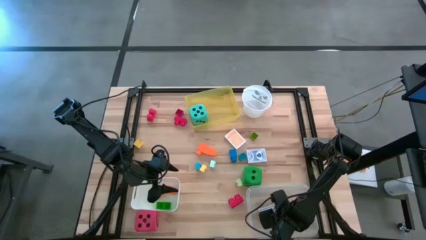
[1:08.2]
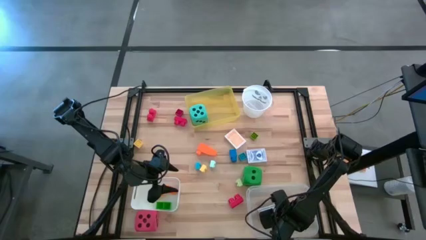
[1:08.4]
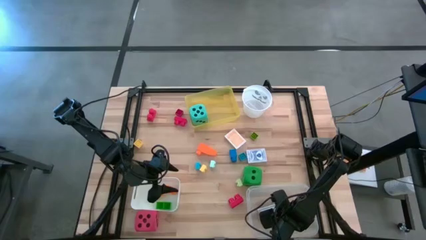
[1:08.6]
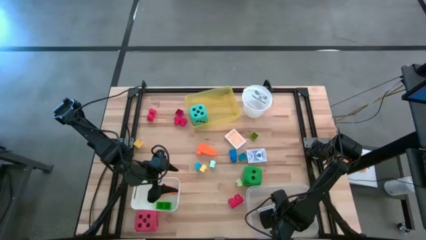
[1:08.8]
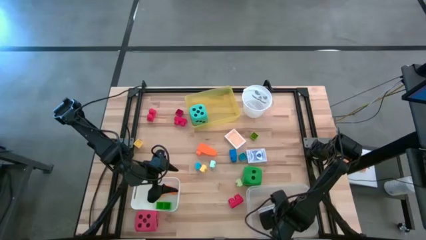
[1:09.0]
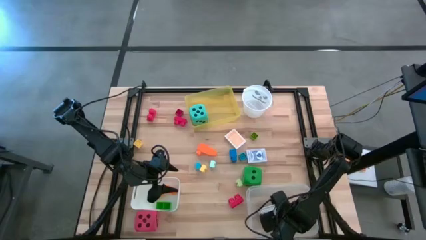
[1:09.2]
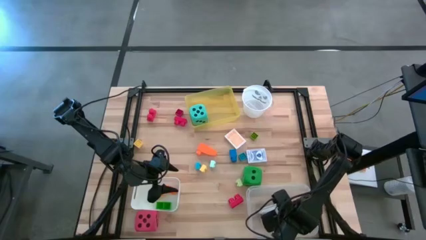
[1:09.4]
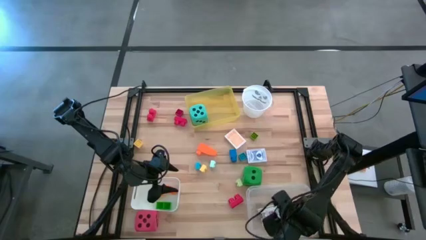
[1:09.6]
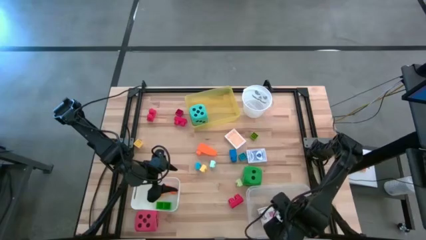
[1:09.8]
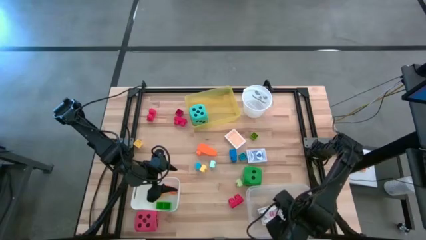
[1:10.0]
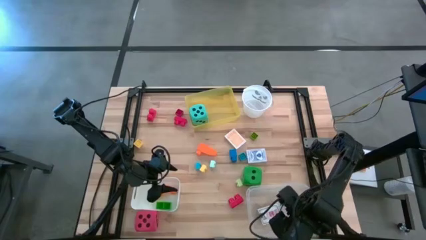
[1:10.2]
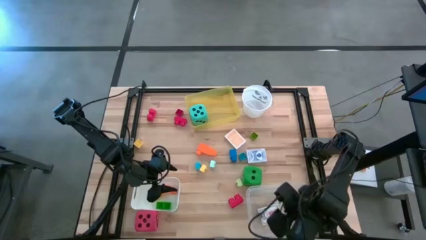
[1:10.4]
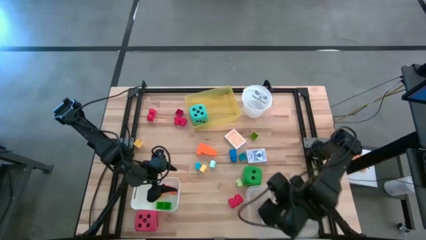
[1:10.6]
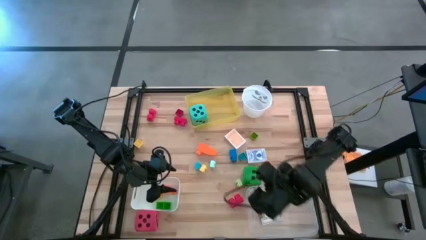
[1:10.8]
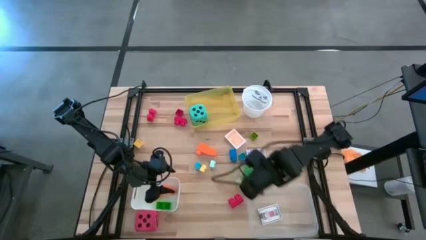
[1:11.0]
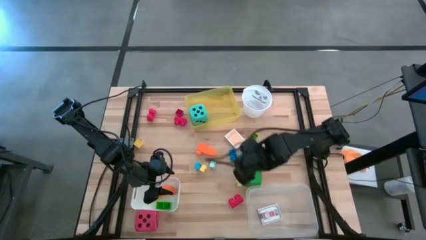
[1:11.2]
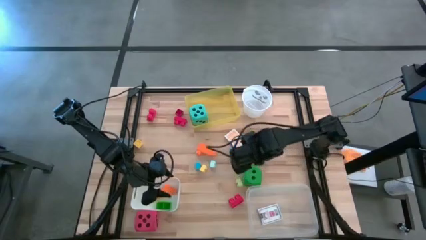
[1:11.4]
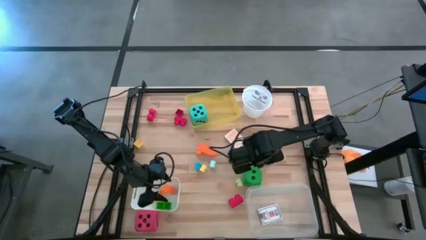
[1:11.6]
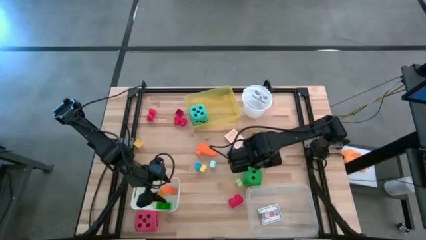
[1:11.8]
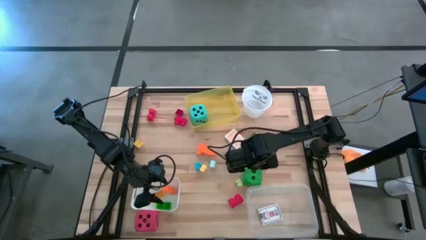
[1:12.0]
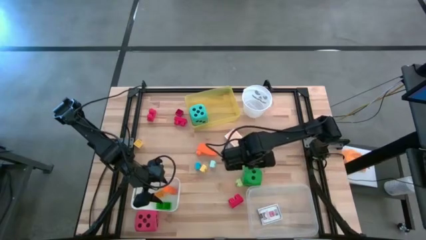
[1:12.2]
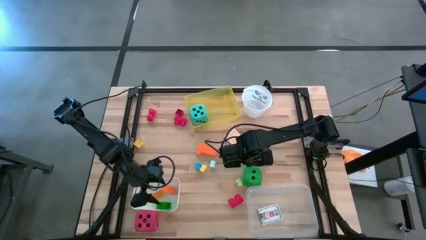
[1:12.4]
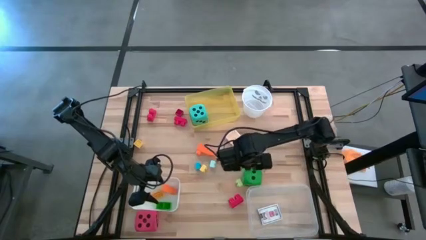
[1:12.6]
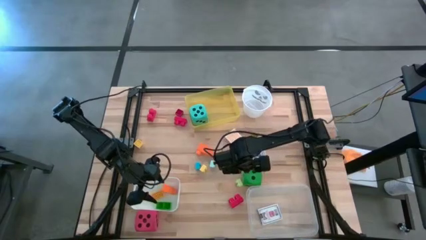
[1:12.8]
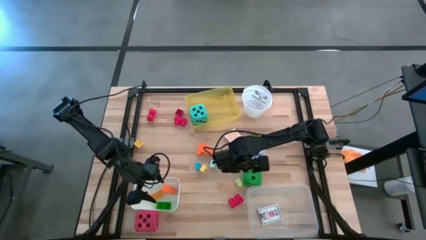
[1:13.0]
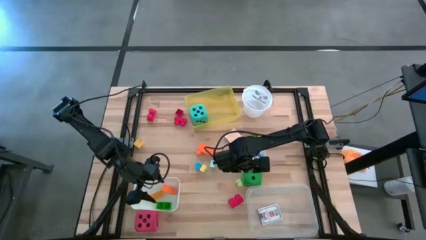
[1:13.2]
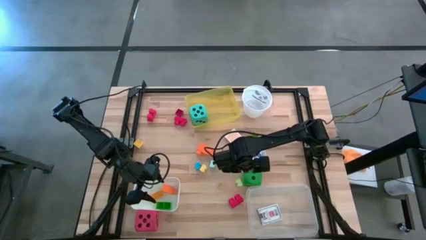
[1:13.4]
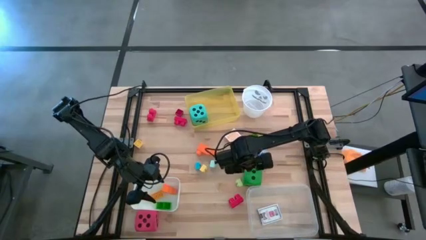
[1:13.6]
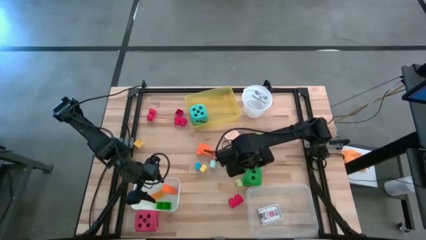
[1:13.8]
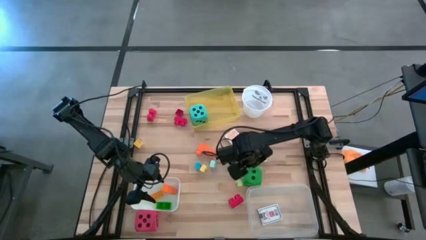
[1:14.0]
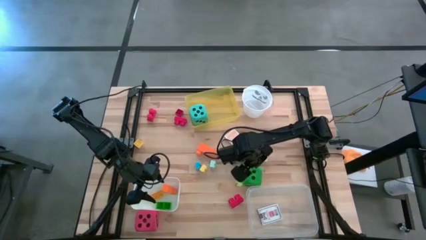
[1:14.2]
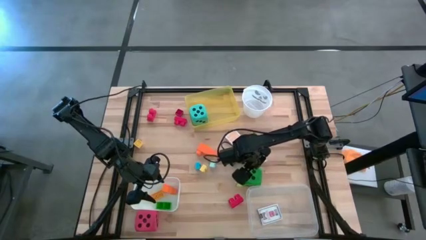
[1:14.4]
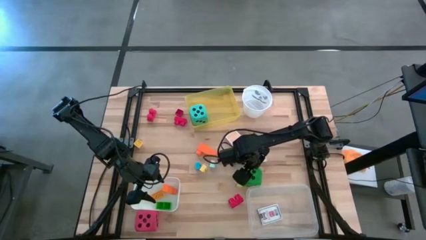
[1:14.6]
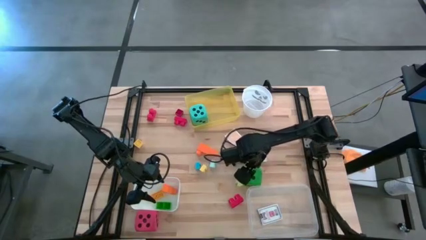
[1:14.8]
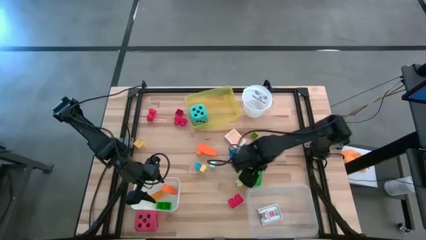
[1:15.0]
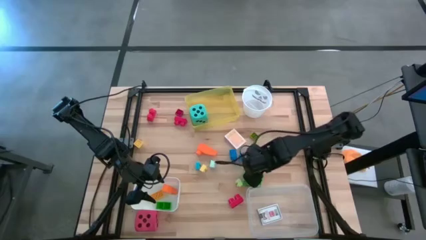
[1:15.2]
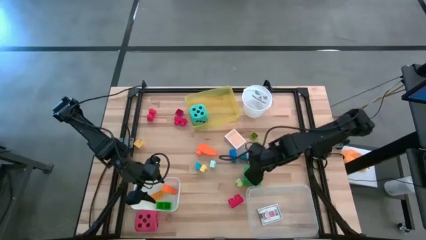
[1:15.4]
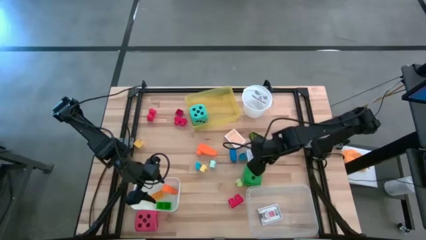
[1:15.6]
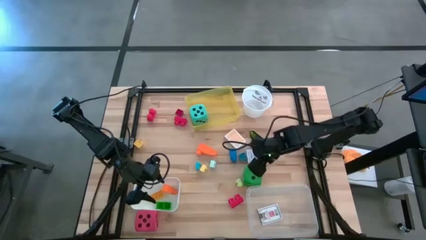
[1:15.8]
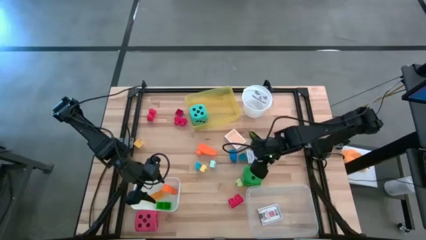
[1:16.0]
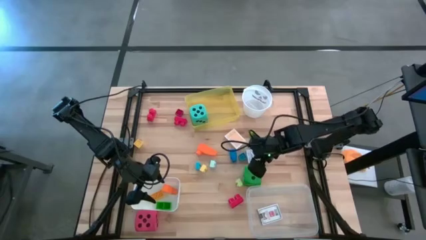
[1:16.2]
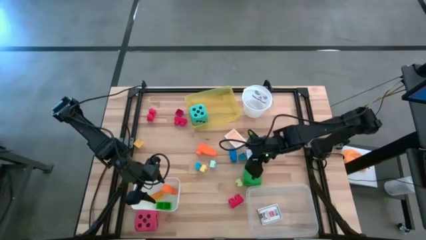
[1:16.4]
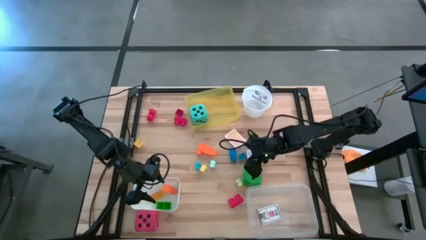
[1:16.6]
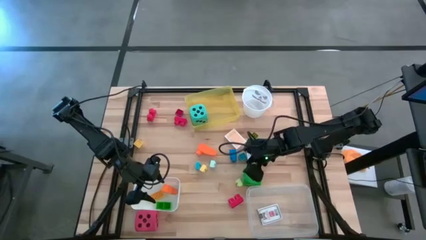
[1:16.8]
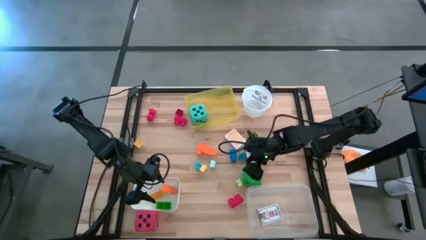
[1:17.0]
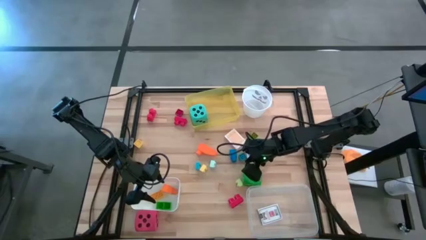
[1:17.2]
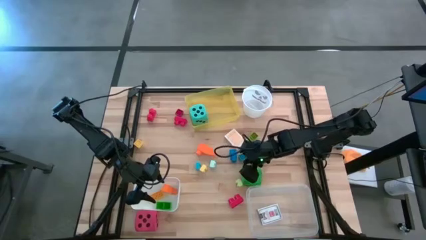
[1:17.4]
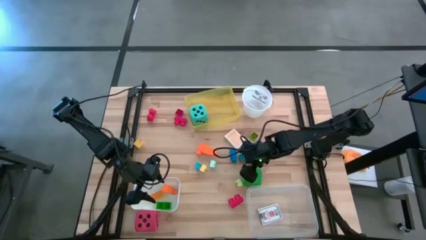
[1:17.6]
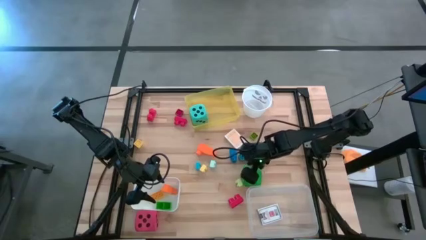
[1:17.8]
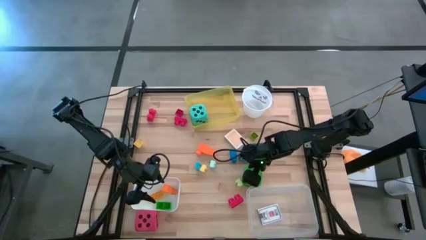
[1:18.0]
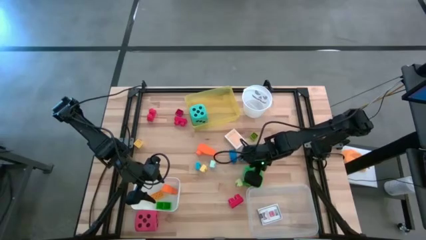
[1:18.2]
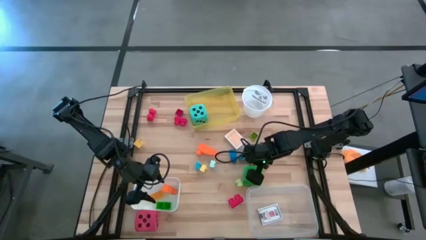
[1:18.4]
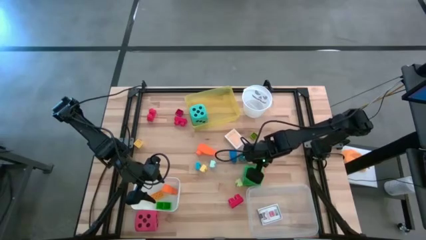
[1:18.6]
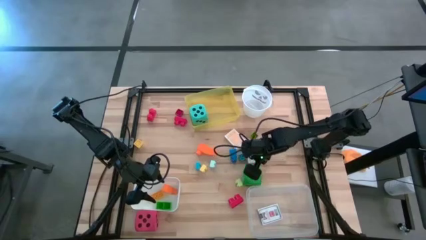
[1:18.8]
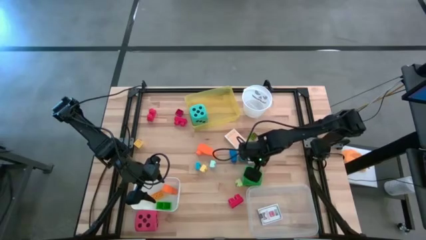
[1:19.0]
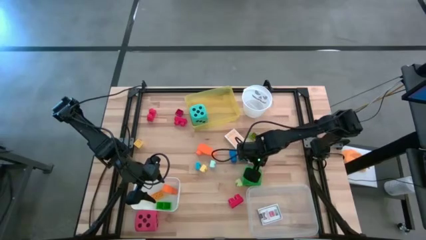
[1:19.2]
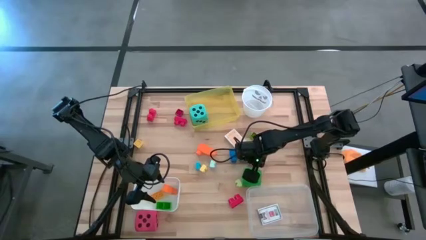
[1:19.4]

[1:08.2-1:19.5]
Task: Pick & Place Toys
Put the green die into the yellow bin

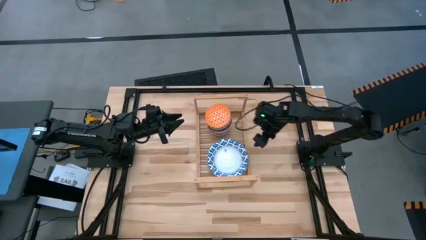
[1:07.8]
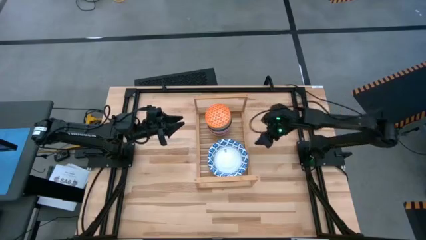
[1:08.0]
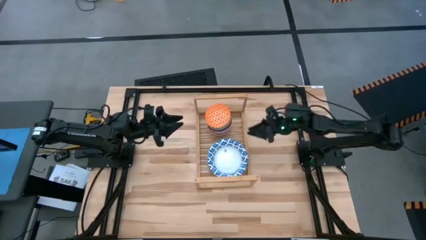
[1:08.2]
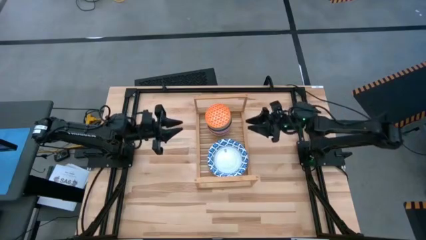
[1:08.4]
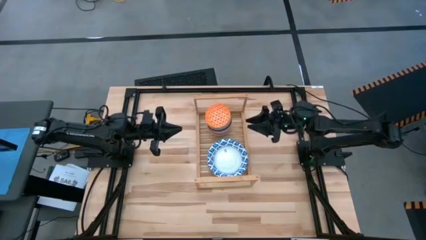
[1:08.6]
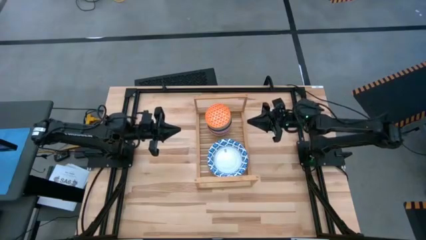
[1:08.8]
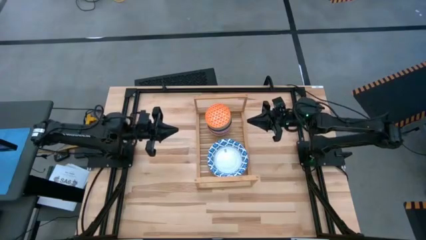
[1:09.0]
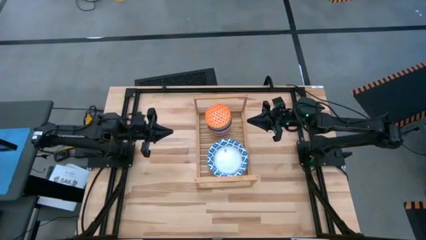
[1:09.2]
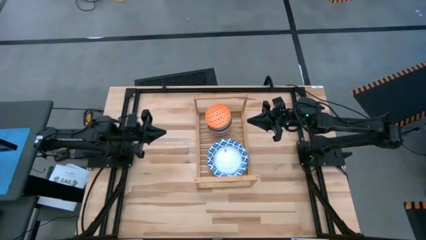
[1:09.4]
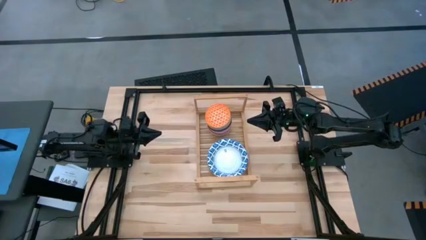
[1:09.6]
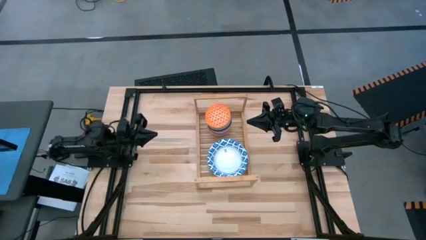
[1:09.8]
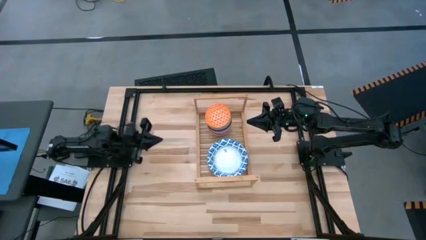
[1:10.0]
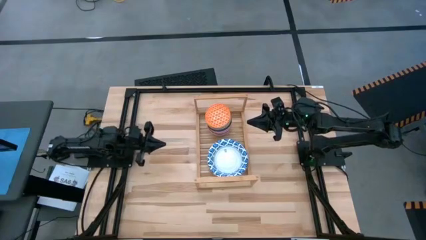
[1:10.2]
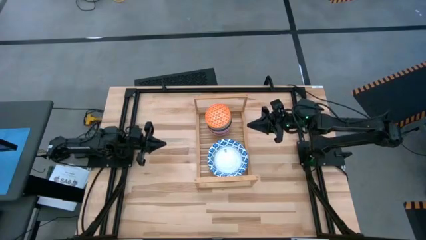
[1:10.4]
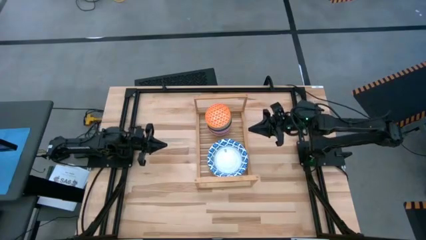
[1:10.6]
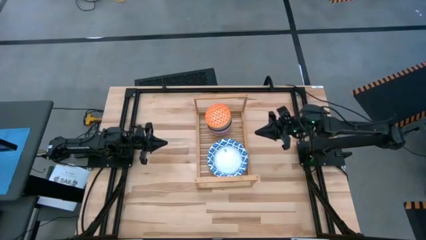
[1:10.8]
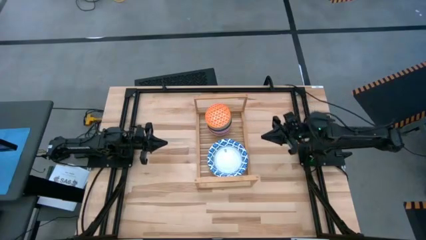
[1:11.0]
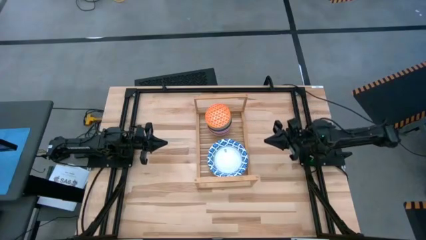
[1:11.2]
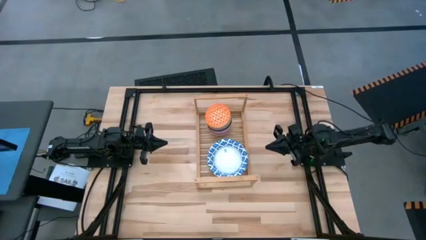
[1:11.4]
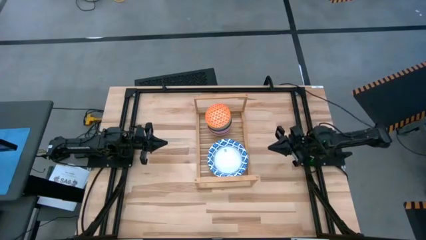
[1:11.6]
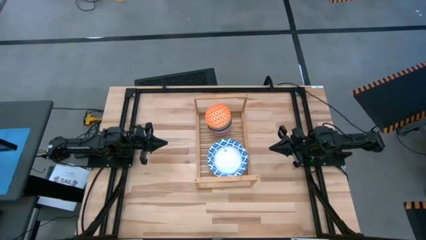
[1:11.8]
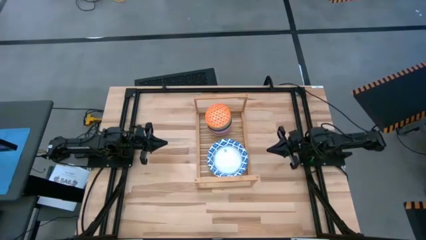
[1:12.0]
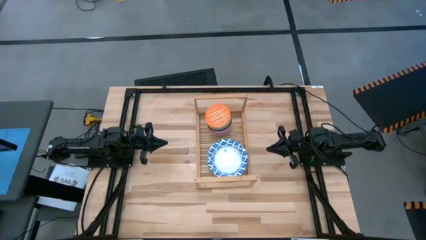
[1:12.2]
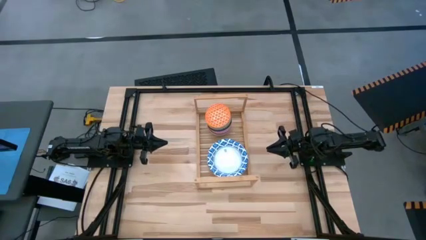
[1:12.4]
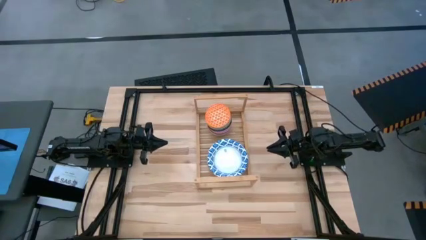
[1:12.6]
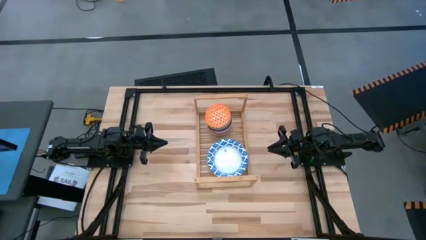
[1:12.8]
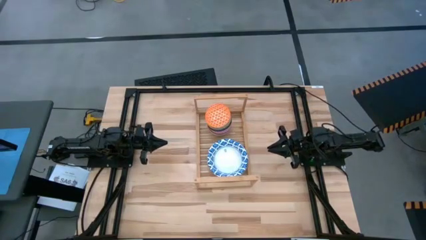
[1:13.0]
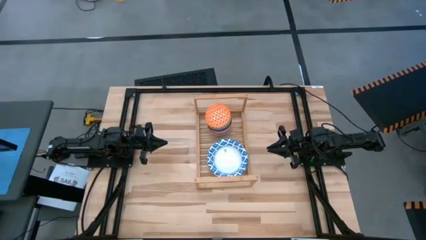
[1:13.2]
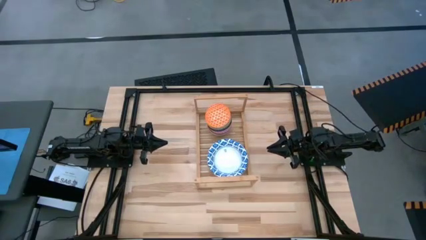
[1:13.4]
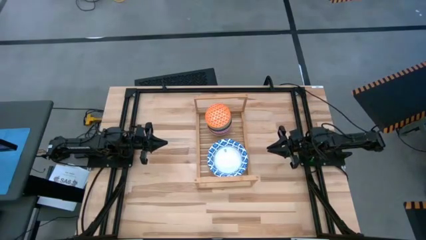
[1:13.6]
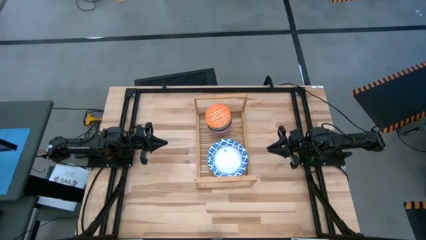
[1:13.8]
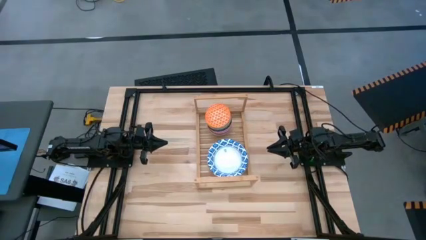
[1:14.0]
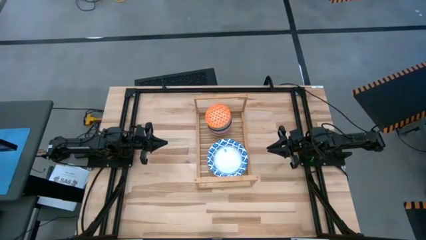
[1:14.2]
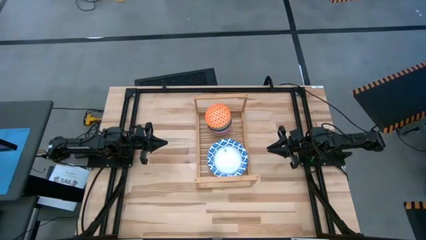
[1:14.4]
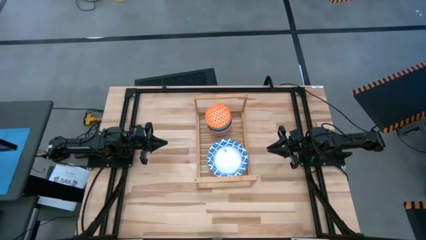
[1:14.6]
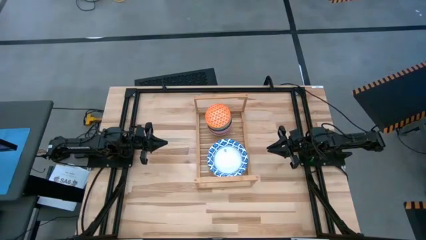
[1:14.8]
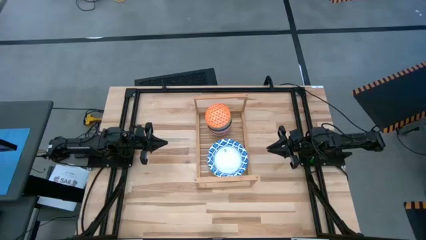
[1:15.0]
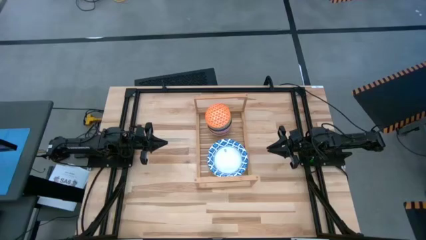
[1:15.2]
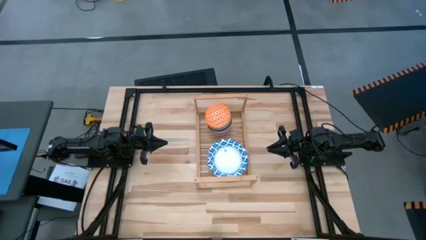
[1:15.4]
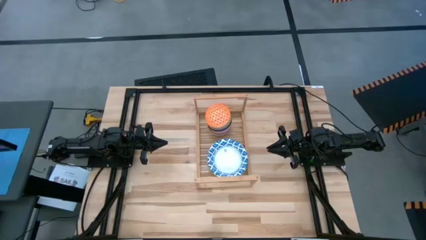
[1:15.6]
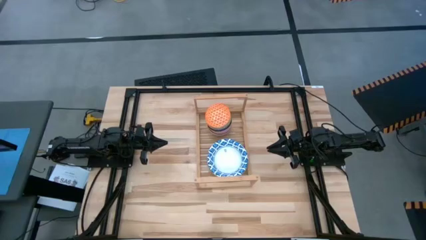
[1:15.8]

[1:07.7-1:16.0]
Task: Place and stack bowls onto a shelf
Return to Home Position
